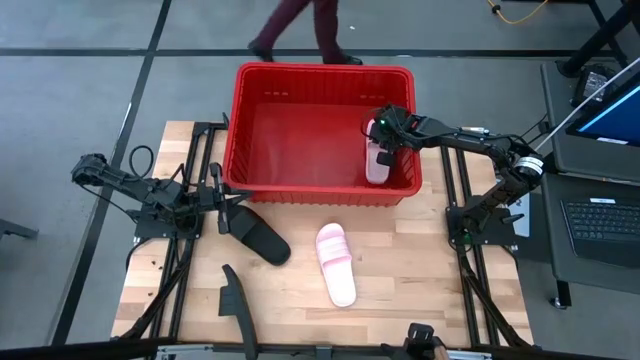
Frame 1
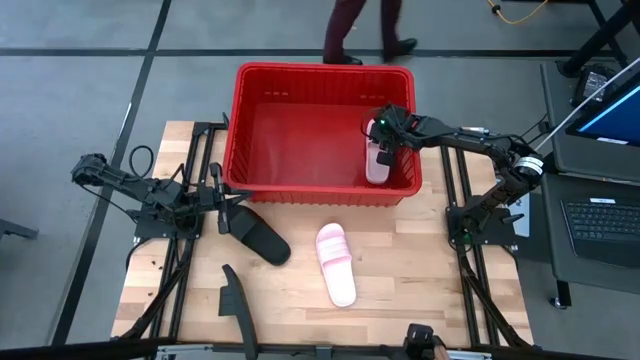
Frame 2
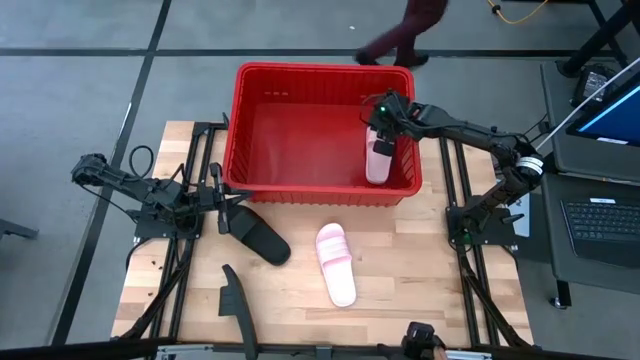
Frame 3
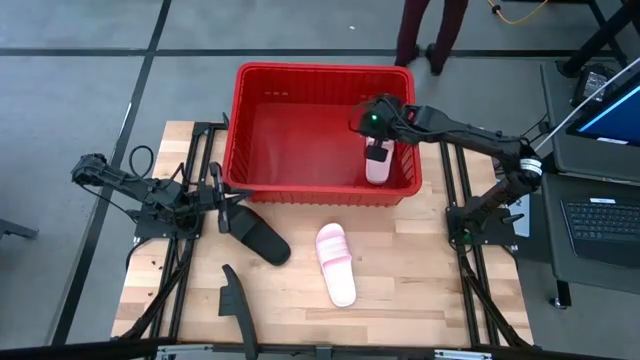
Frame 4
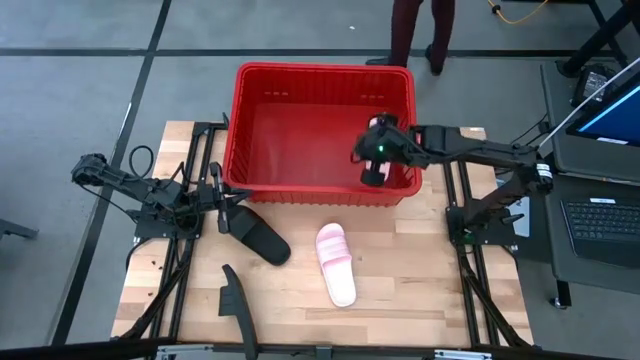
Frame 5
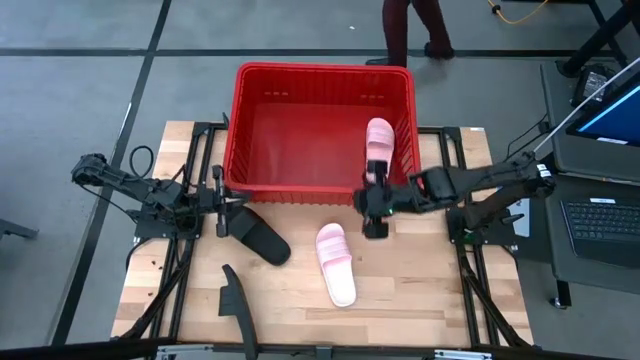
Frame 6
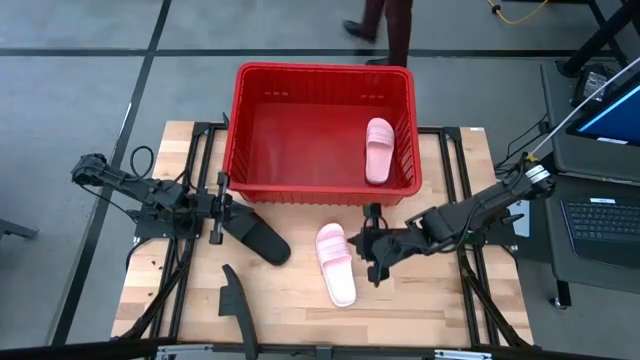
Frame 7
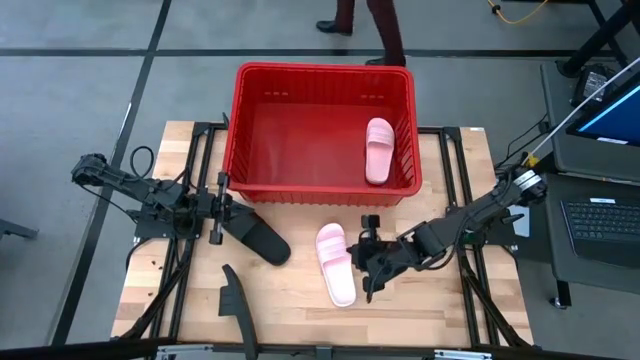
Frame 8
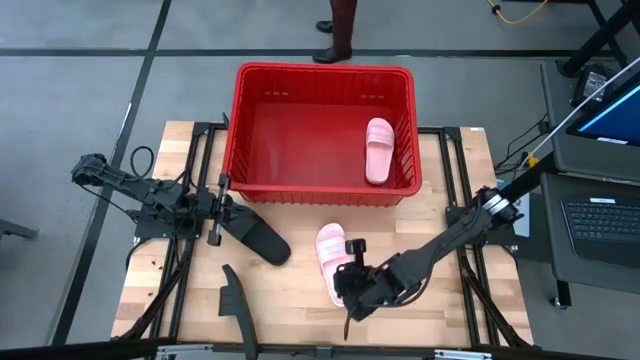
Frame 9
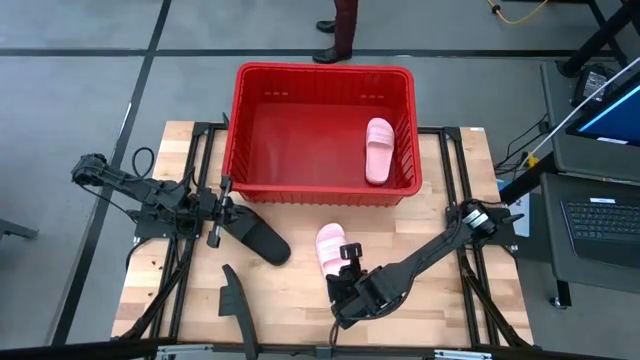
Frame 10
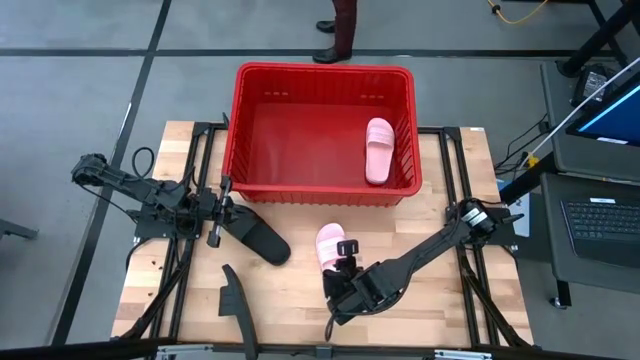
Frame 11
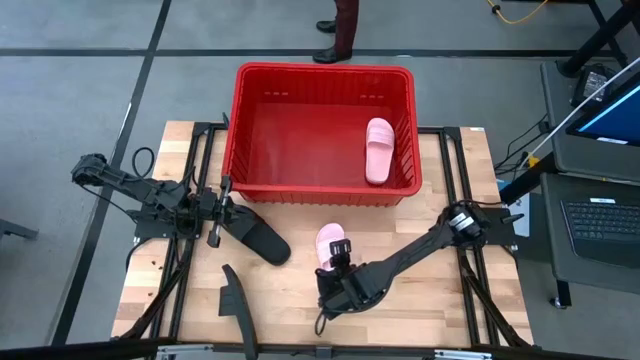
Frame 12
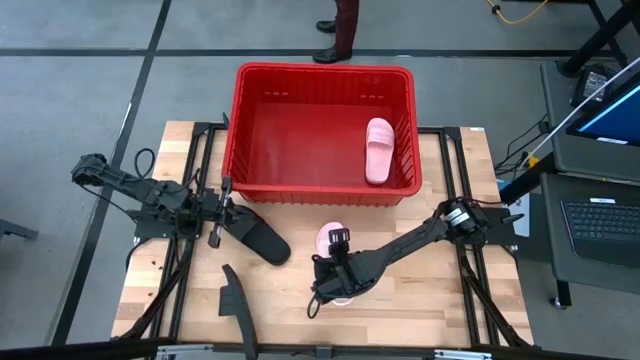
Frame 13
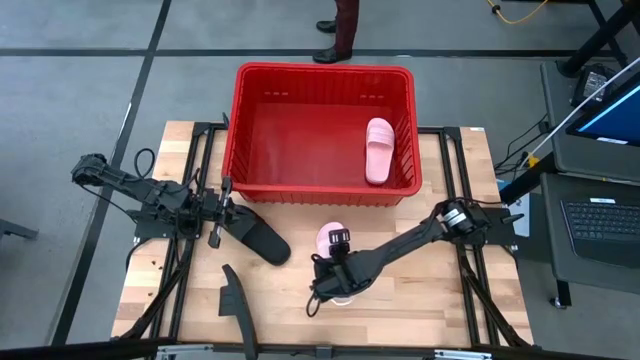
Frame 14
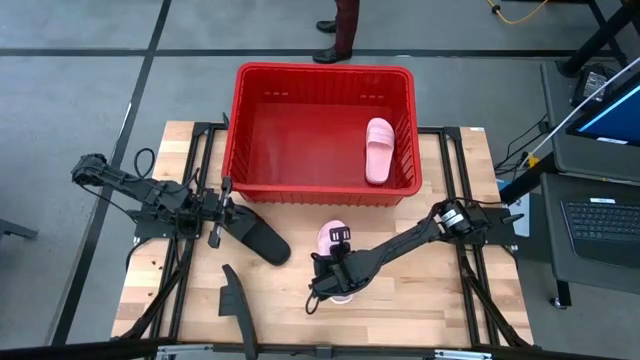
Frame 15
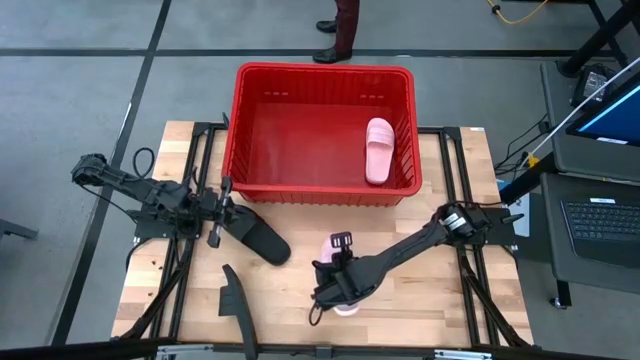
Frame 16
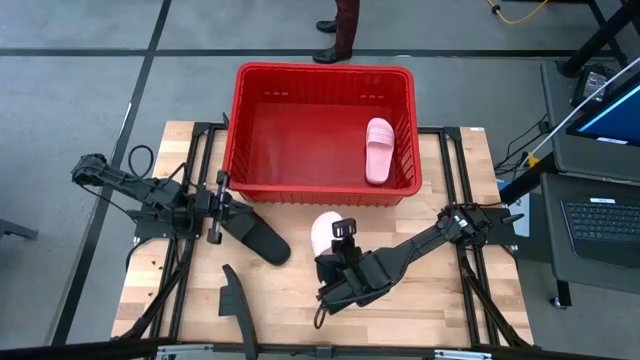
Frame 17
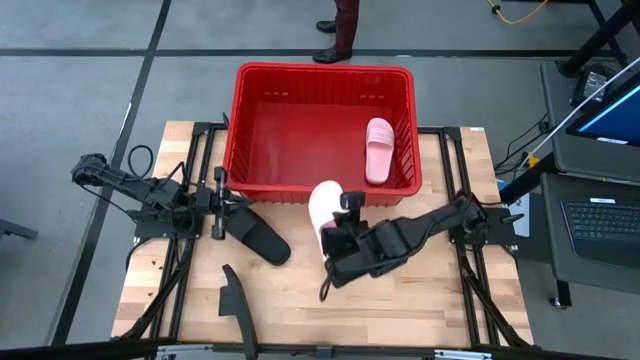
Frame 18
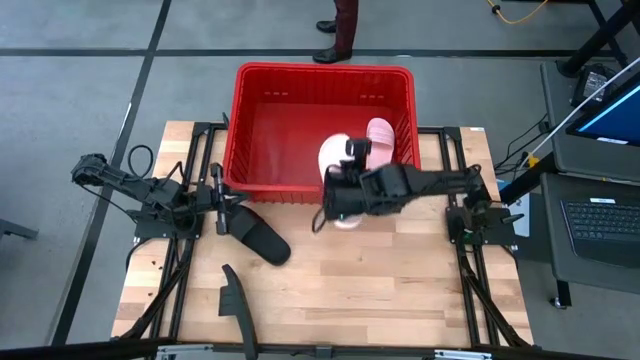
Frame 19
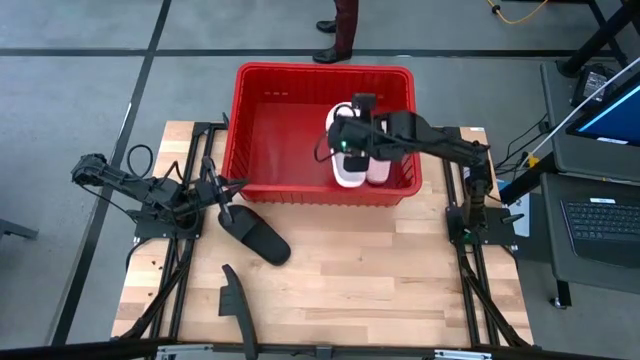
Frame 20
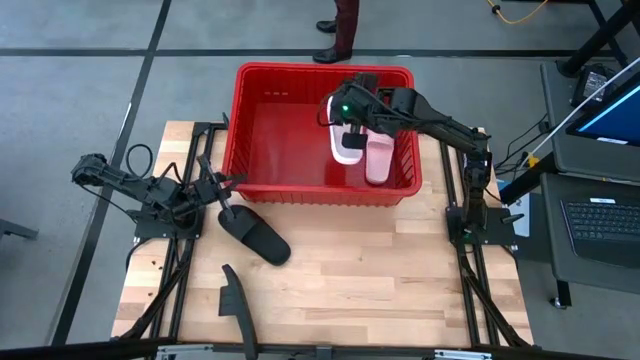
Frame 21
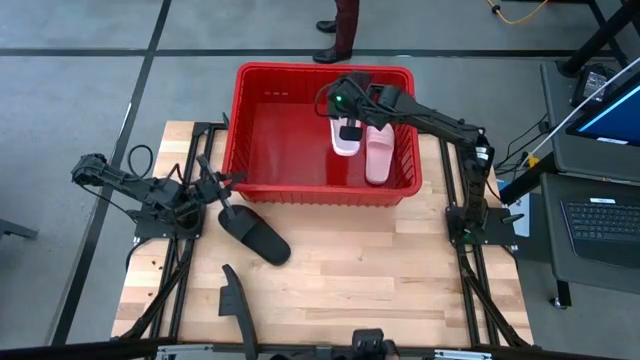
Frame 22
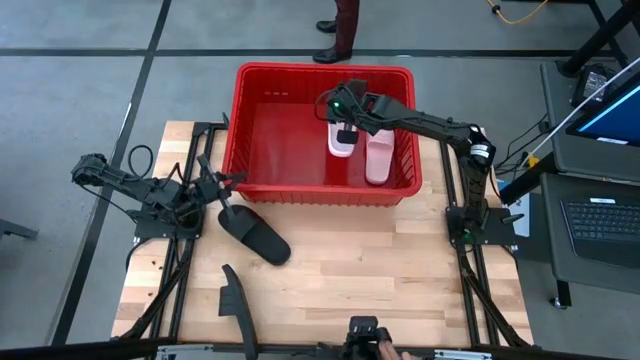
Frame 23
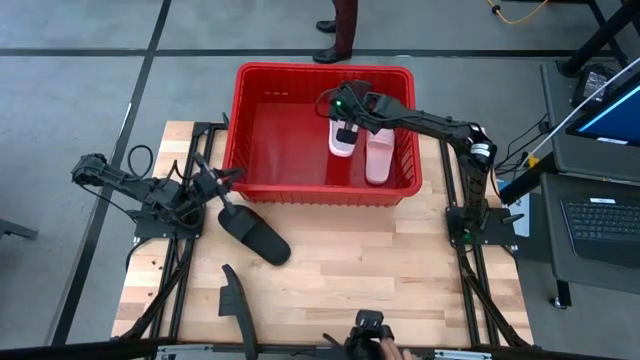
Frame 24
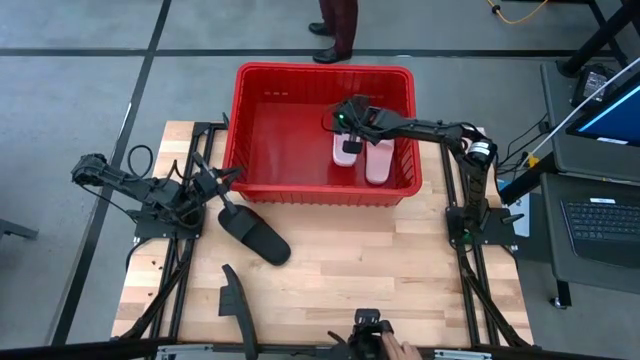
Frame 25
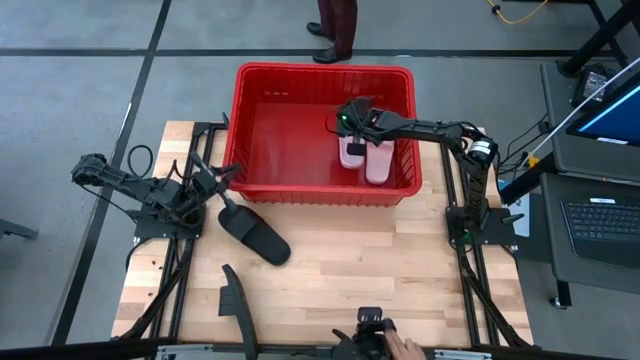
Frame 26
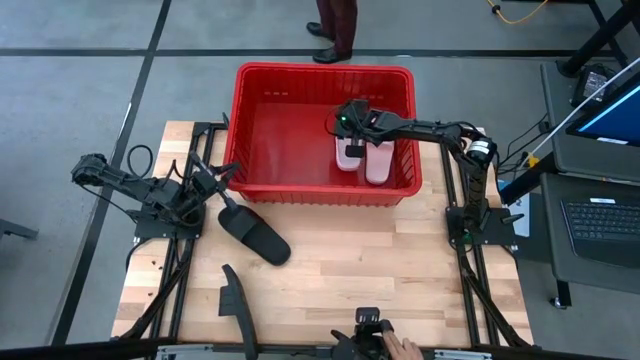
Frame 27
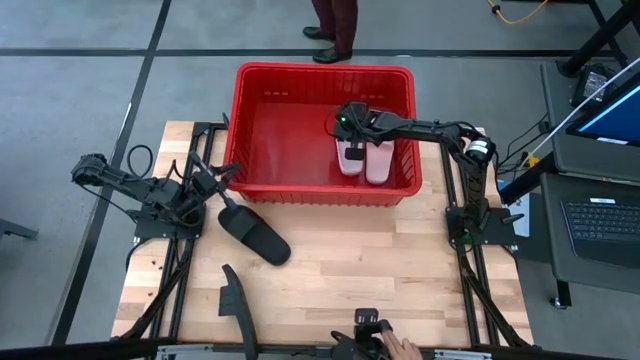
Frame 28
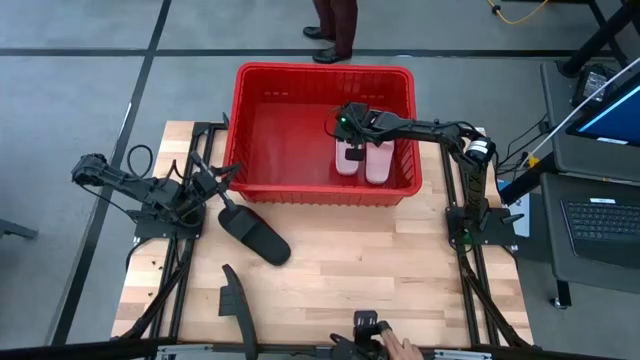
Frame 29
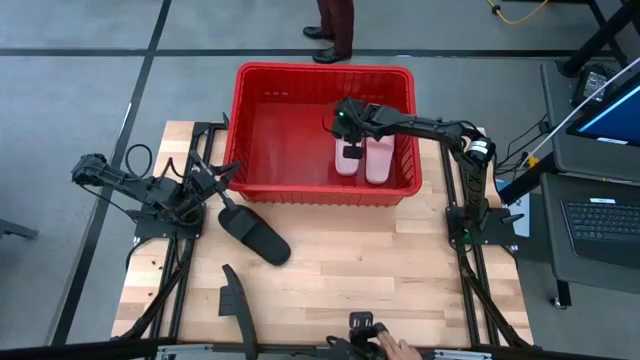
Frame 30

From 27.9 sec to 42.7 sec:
Task: Pick and place slides into bin
Put the pink slide into the red container

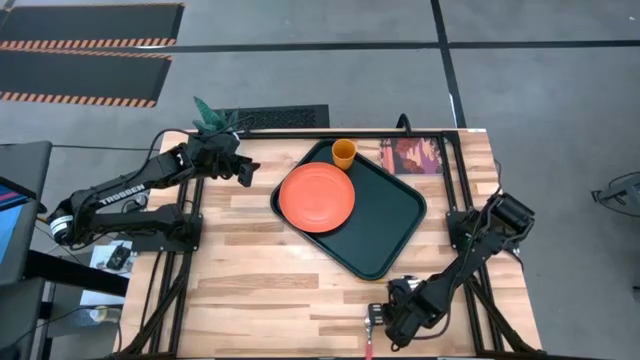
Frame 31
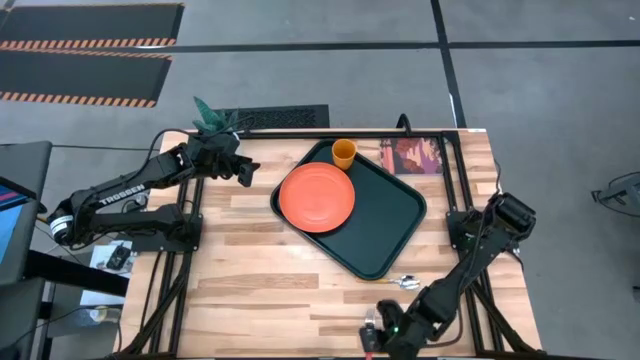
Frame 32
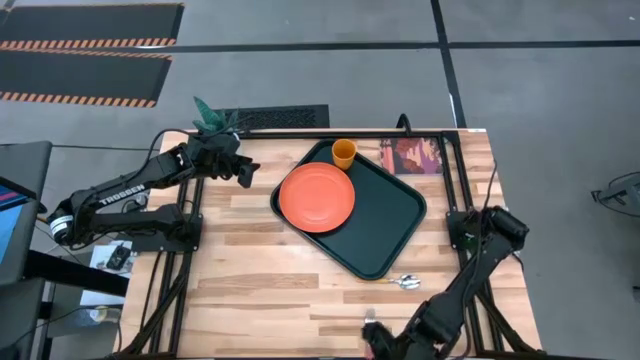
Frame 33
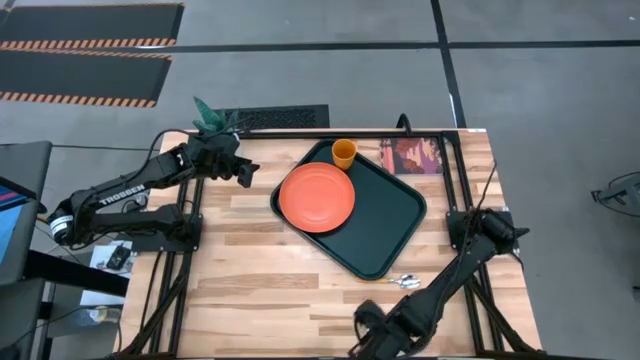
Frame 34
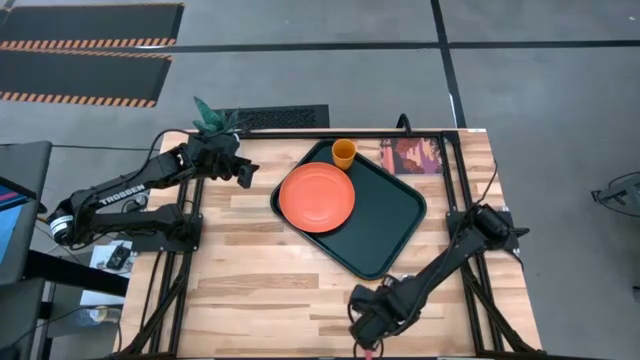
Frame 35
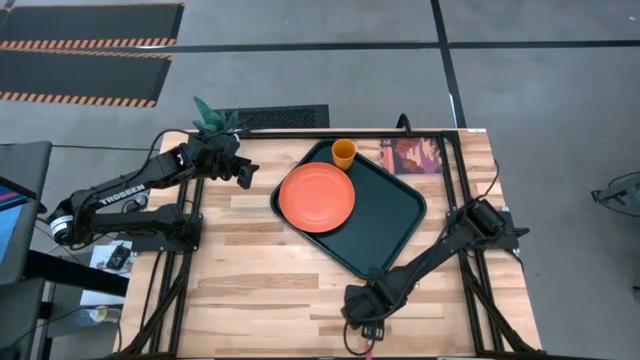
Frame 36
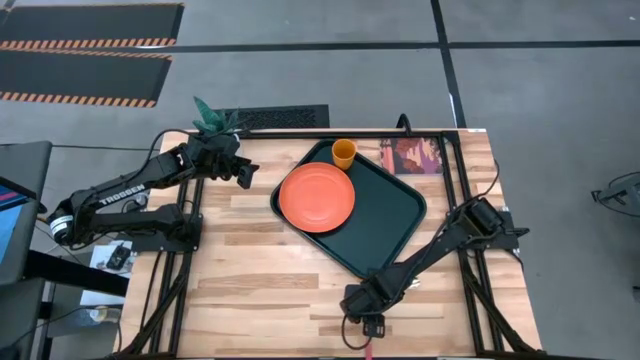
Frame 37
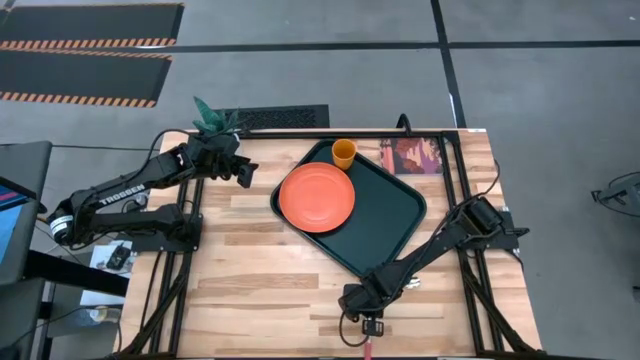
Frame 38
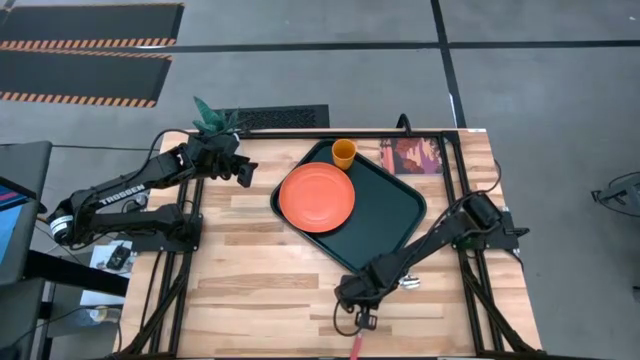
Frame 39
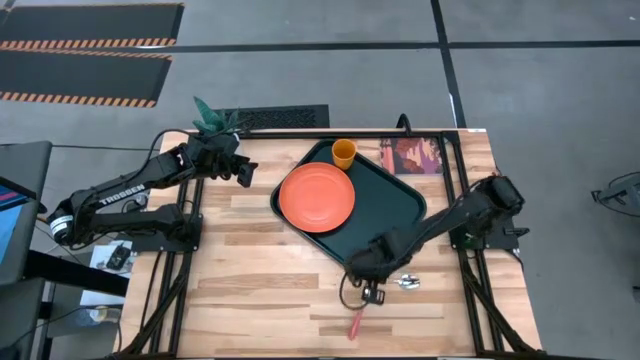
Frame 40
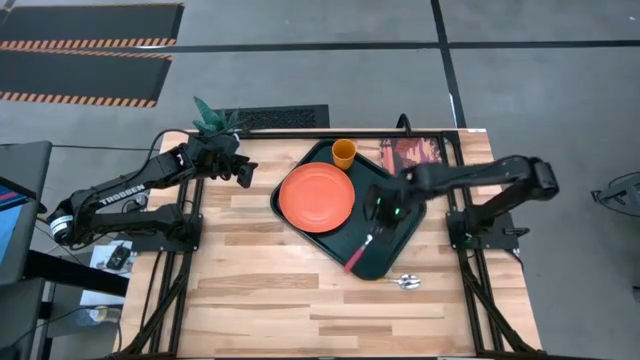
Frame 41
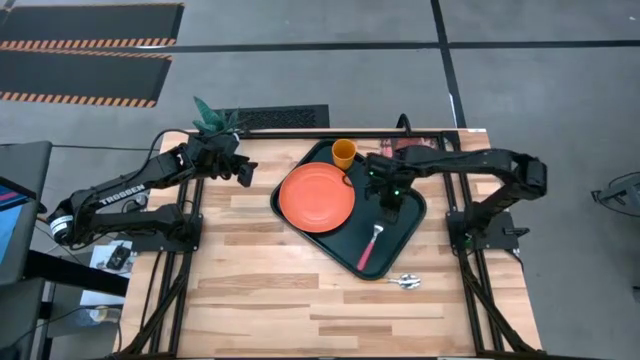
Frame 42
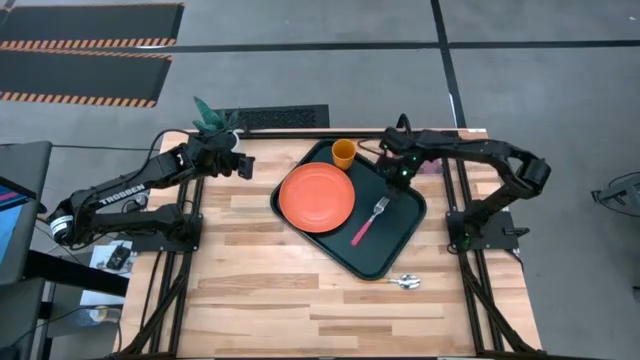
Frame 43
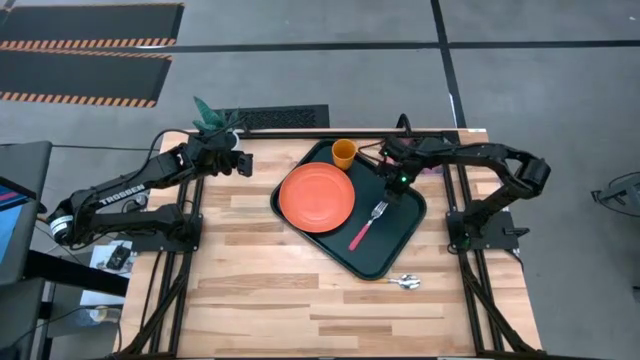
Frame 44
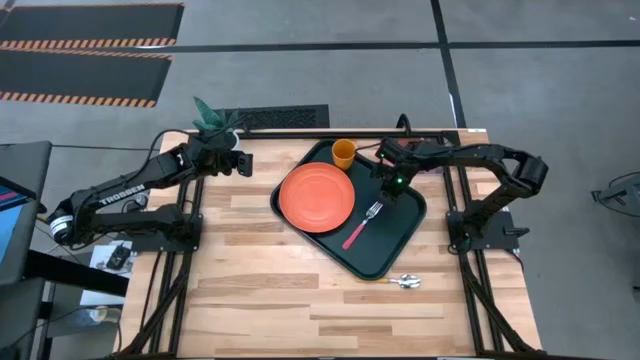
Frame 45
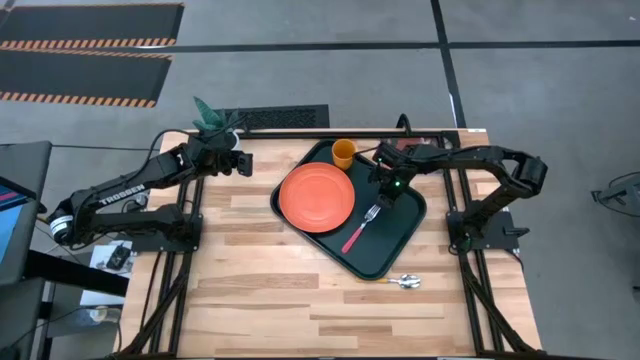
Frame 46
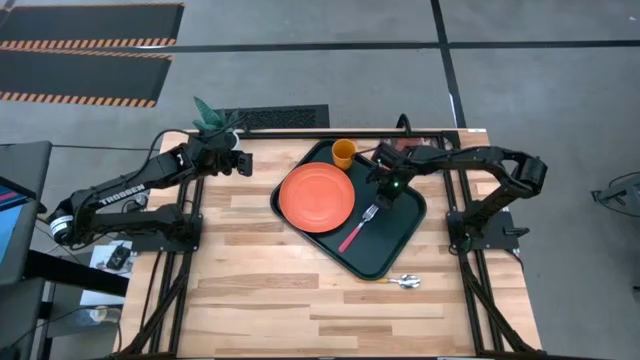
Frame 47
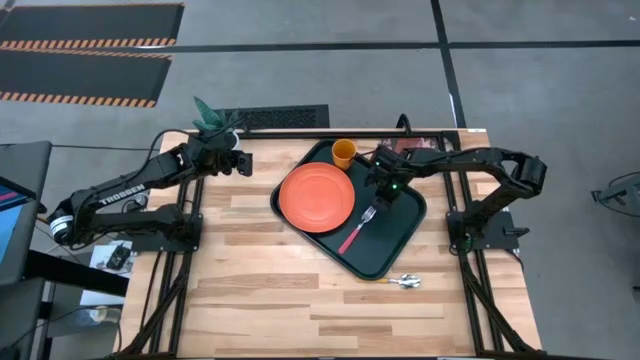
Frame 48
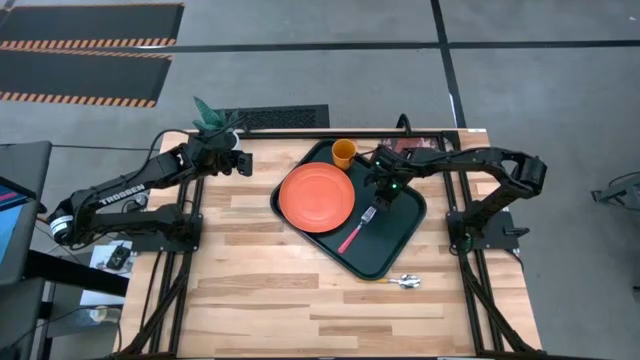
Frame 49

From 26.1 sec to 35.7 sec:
Task: Pick and place plate/cup/fork/spoon on tray
Put the pink fork on the black tray to the right side of the orange plate
